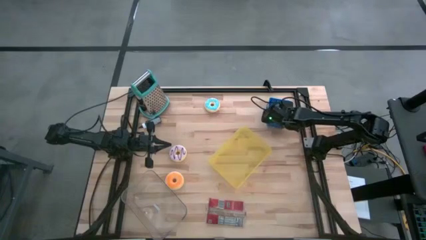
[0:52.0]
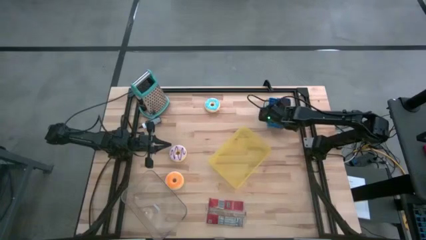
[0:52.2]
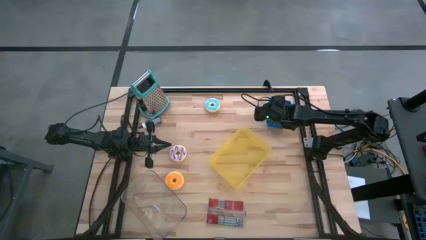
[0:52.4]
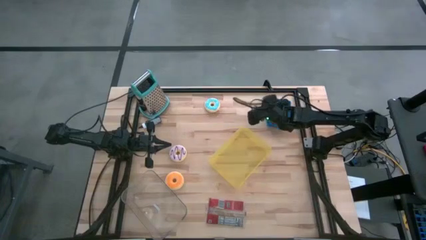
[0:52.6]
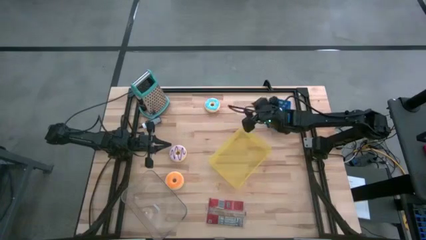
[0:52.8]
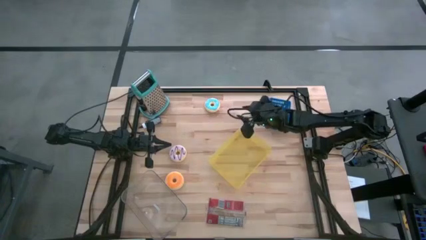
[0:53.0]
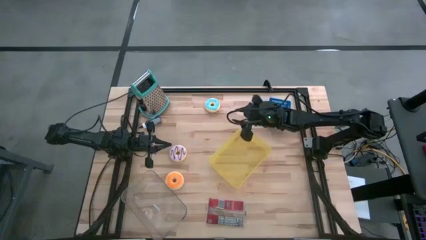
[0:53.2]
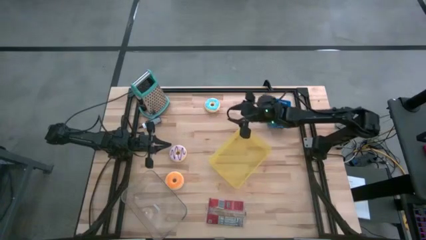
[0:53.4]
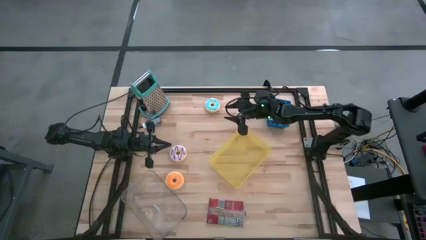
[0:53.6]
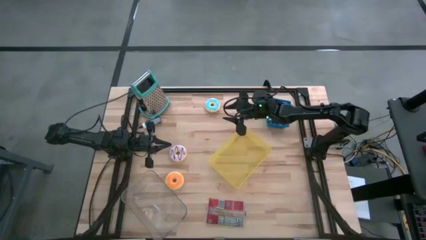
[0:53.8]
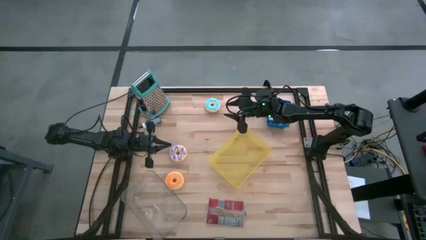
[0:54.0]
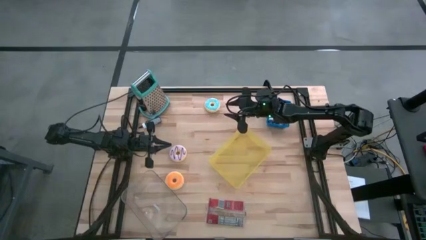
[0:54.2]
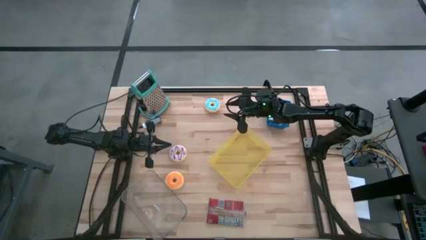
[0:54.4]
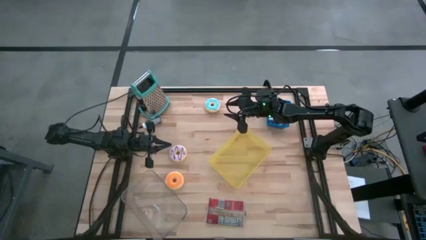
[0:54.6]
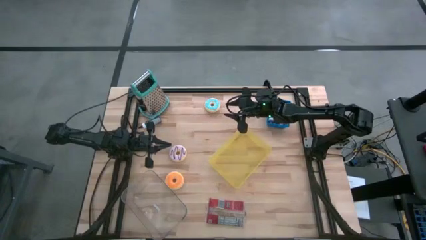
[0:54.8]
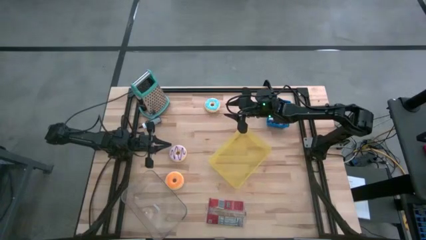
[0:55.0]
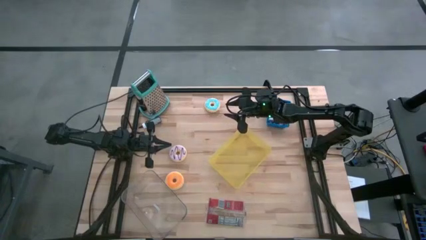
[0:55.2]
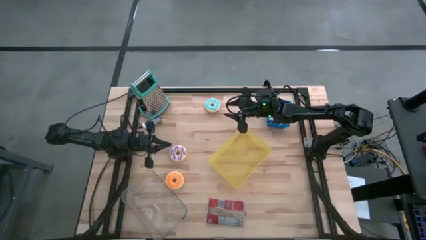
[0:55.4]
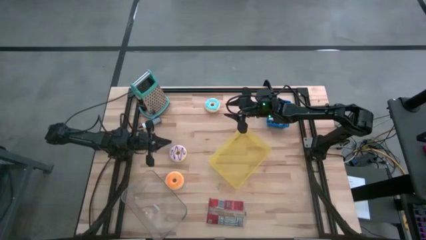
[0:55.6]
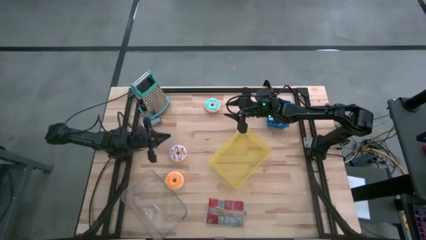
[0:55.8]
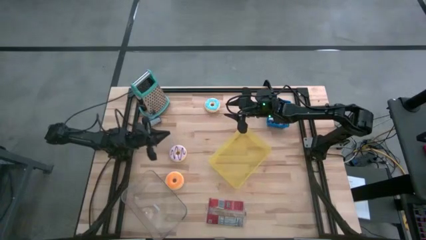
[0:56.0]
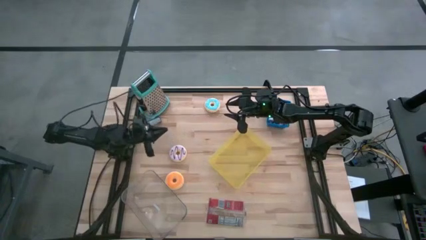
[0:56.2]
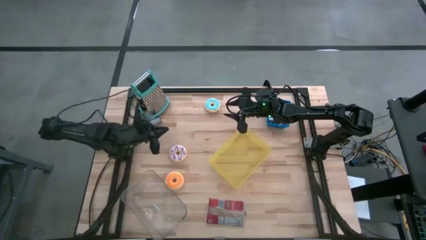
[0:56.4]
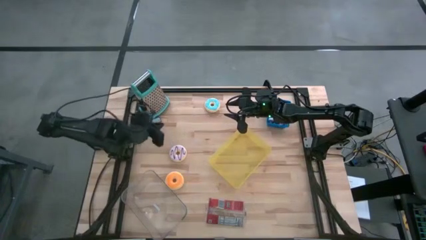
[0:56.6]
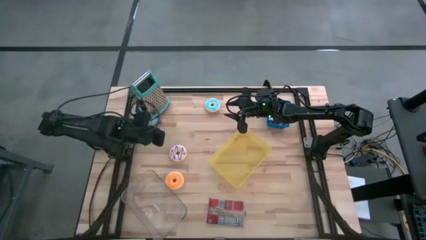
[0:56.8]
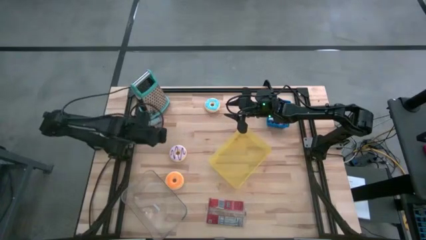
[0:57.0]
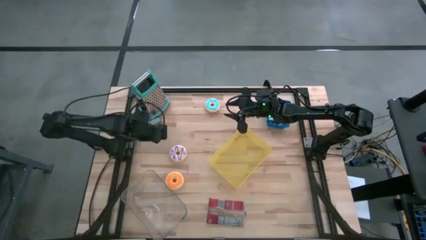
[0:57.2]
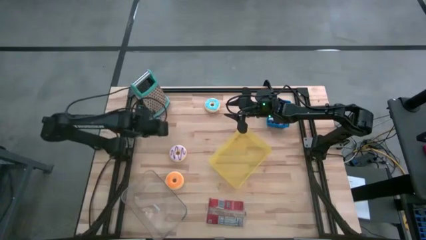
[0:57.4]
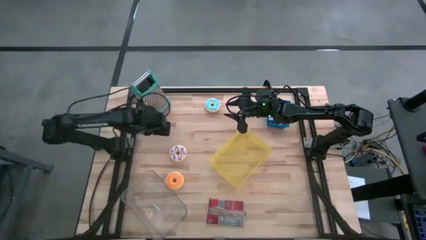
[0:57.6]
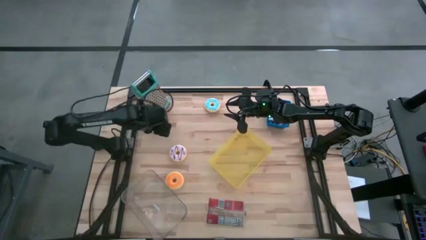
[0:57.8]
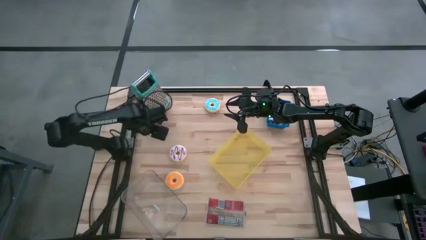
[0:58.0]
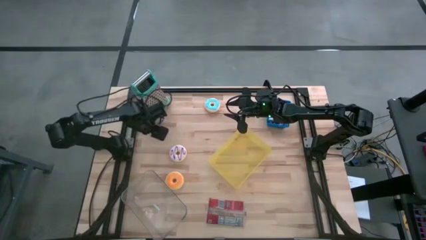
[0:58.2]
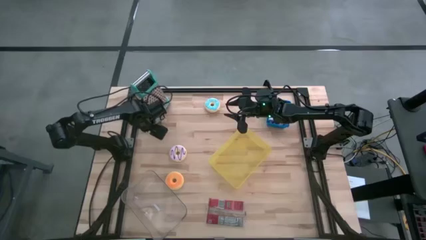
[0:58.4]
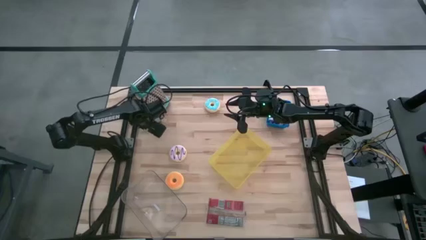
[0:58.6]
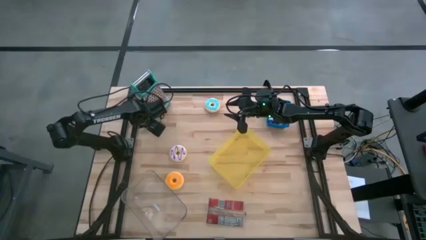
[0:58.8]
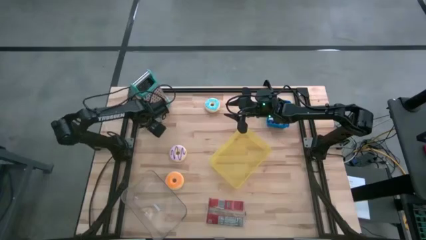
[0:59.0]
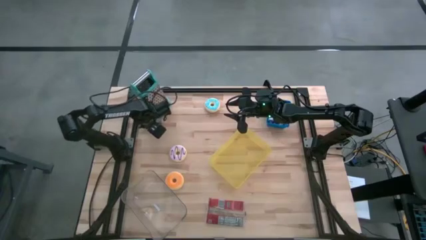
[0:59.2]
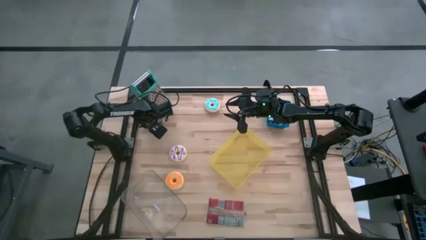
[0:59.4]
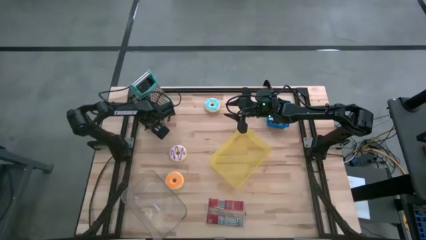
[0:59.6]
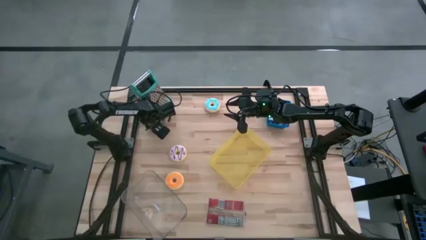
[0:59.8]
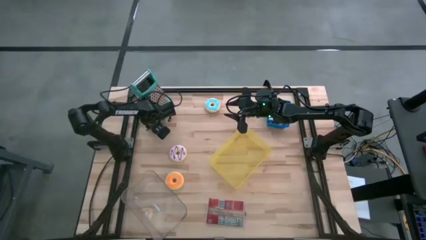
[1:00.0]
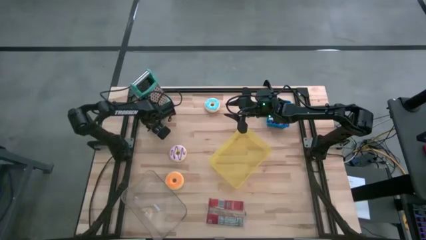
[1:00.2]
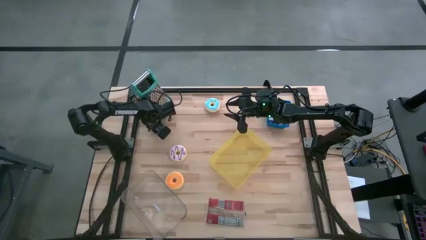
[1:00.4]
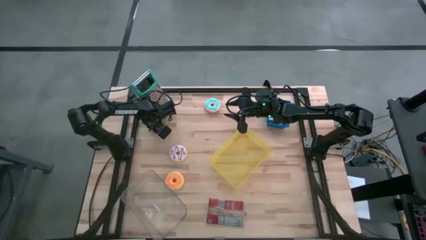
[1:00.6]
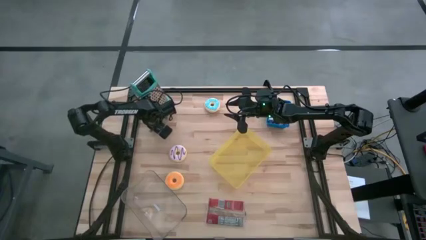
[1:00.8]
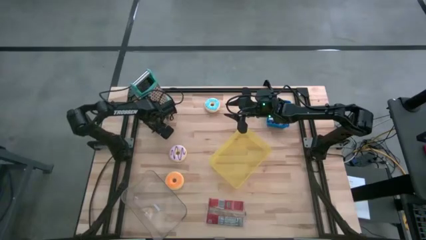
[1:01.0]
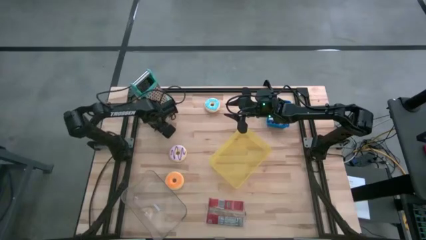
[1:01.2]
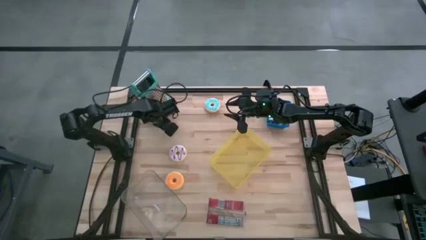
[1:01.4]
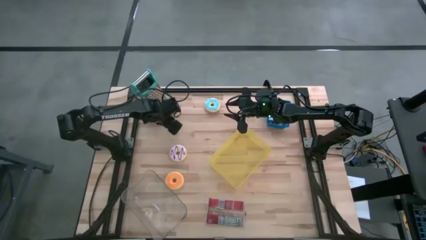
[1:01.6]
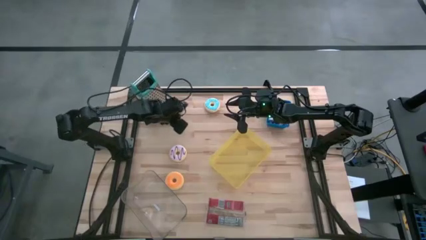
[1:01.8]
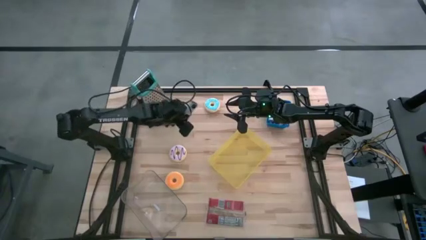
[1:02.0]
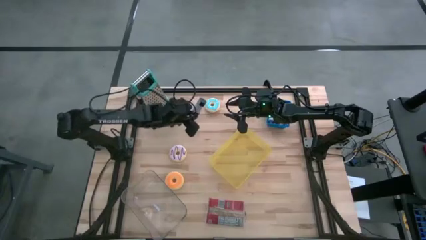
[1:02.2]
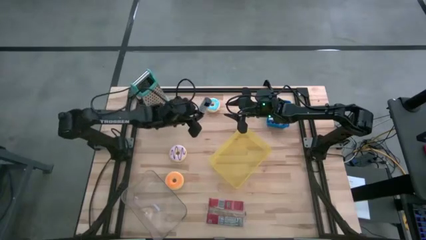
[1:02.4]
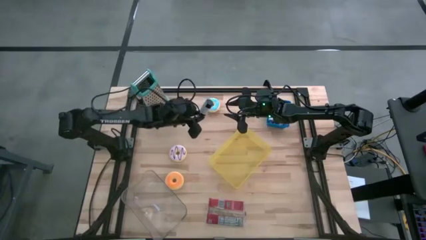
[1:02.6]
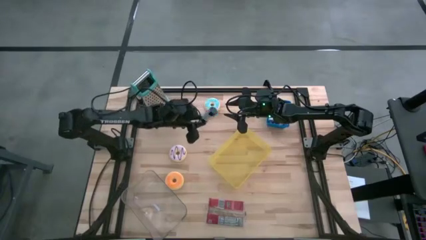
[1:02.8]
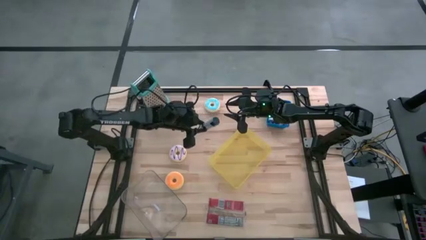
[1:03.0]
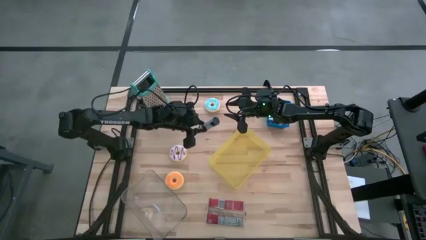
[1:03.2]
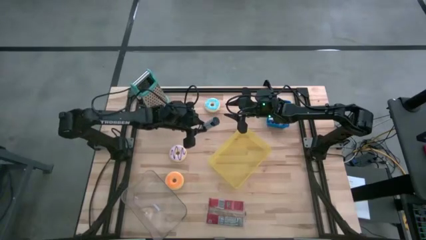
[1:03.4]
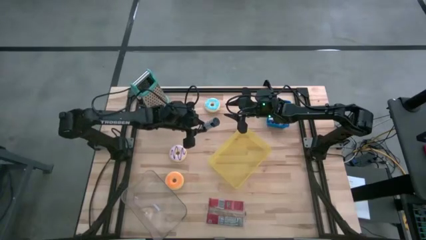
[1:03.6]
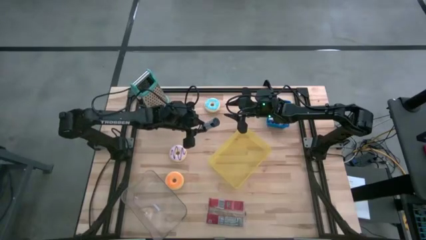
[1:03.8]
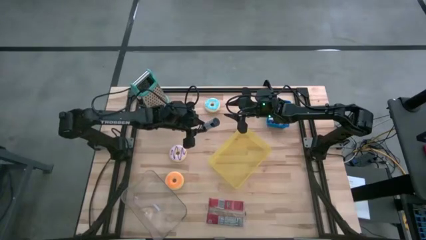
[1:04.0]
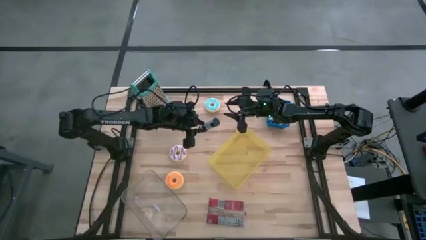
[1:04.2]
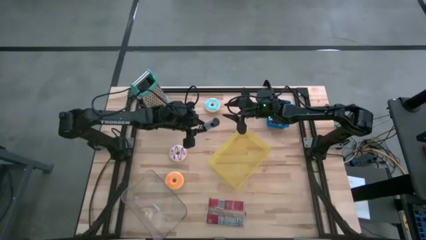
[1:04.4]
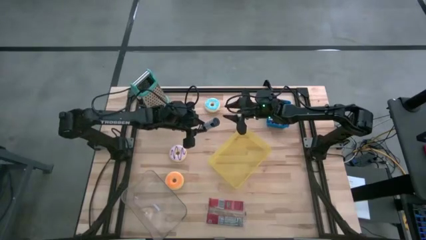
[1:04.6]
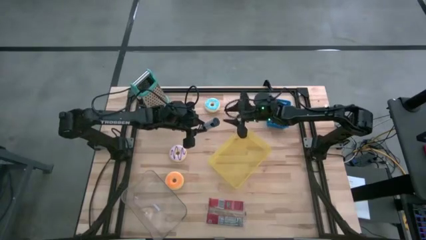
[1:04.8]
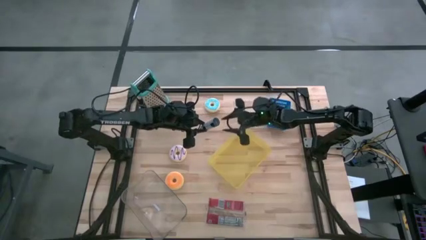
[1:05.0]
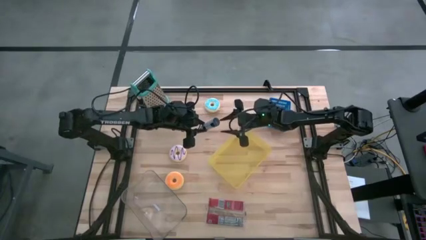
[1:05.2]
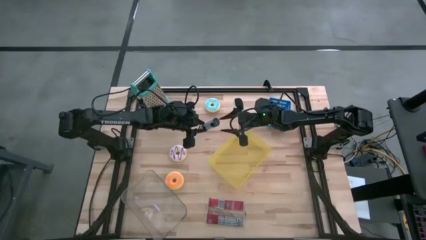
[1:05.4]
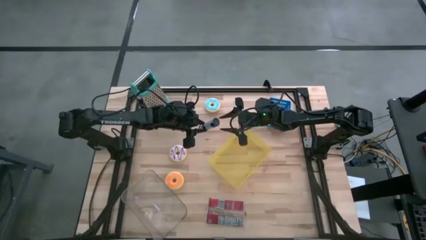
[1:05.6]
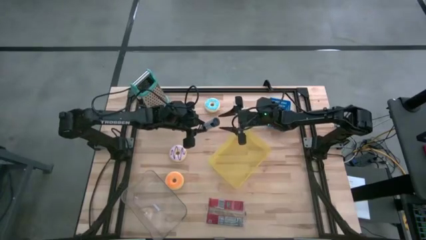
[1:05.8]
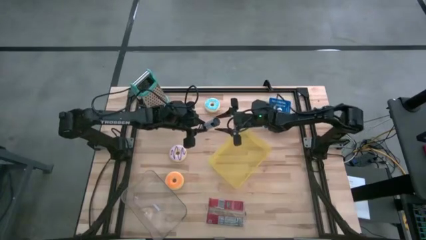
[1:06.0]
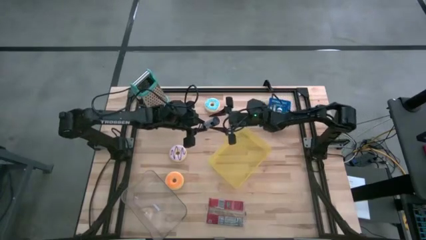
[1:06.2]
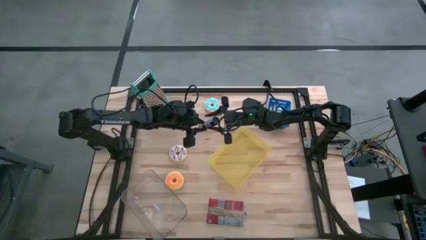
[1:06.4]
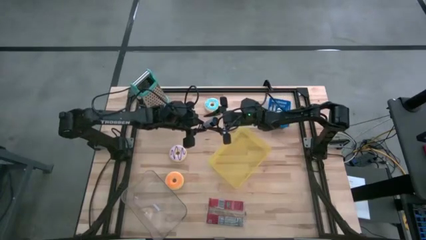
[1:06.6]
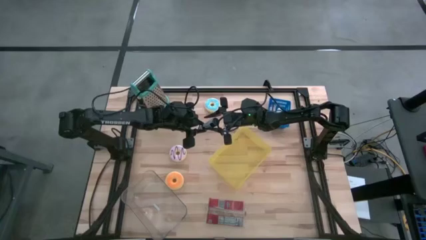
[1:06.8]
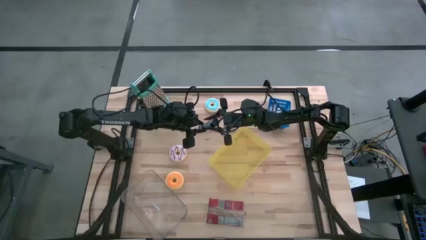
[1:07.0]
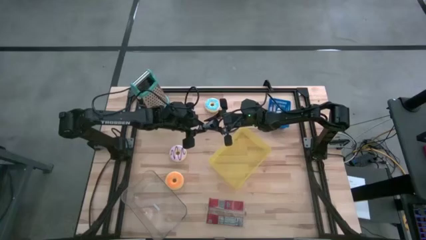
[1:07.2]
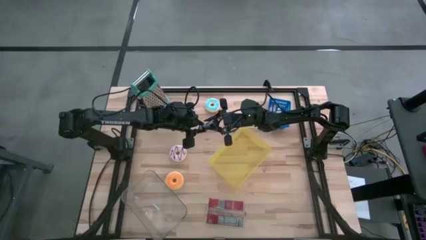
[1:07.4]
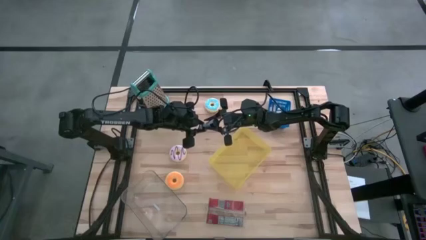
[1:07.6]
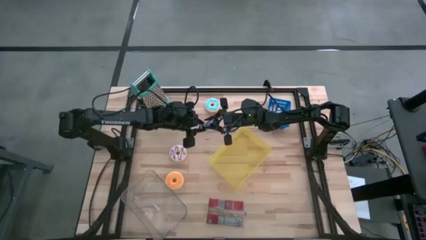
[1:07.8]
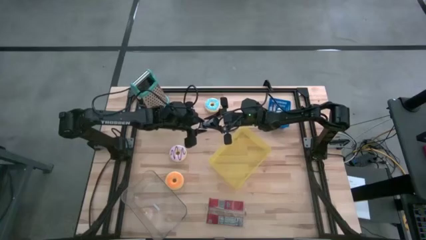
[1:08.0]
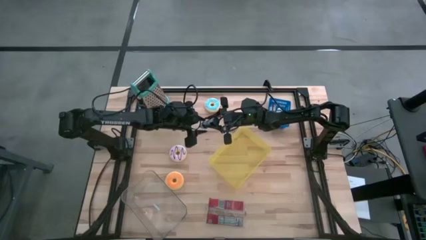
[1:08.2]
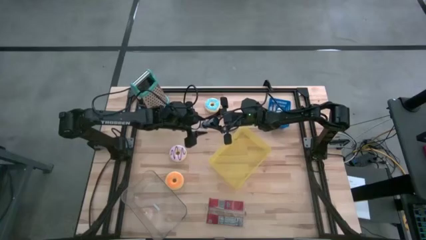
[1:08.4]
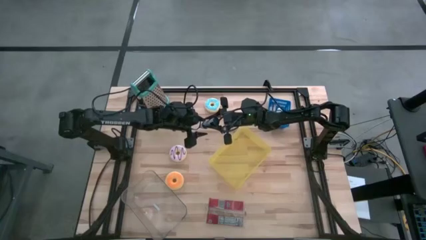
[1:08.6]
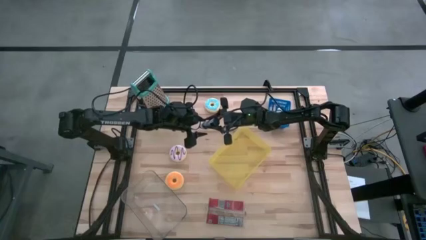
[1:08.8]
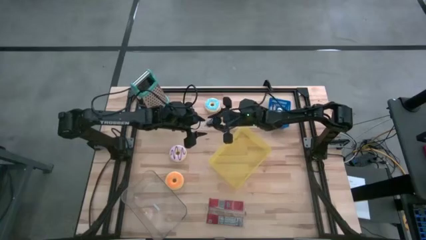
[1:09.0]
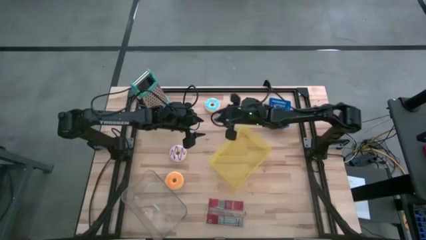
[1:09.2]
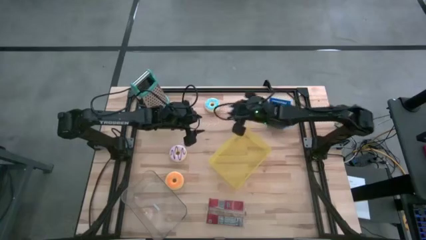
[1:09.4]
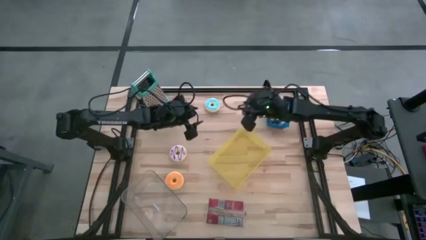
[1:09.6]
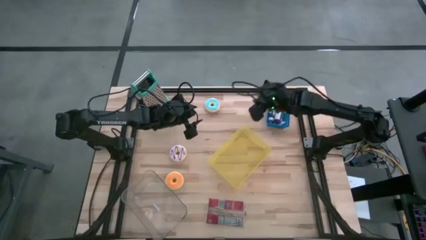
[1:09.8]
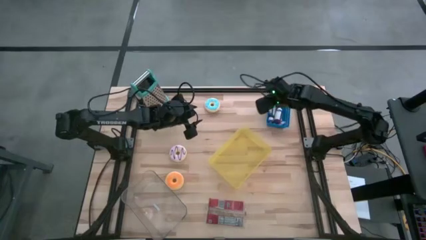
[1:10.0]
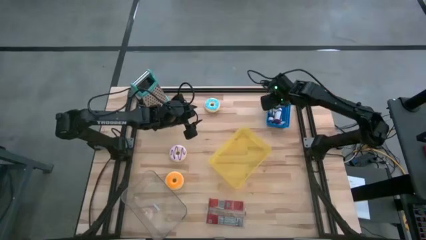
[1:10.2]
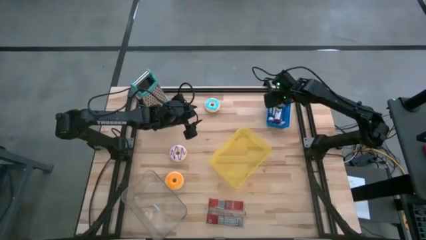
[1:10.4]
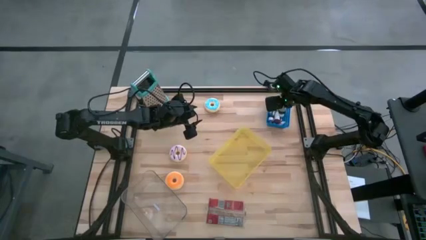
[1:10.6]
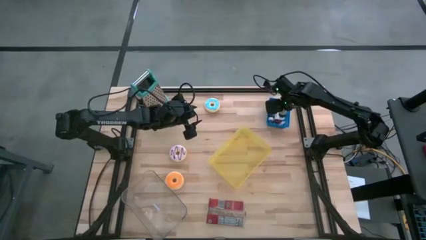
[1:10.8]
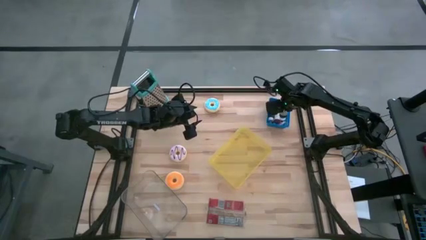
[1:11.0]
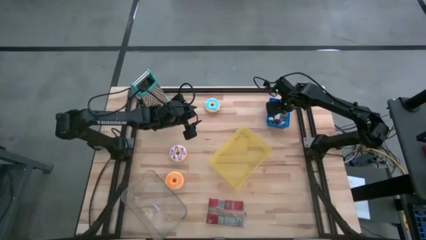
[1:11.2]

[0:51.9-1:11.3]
Task: Pick & Place Food Item
Put the large black food coloring bottle into the blue bin
